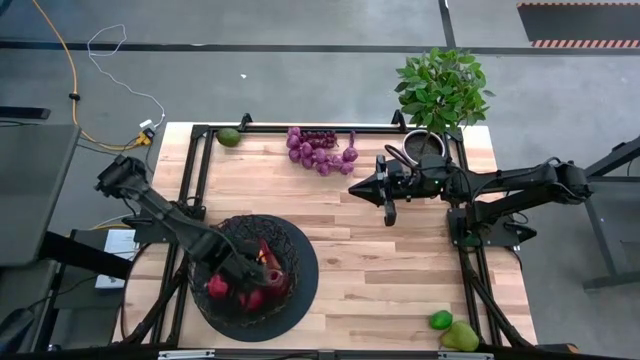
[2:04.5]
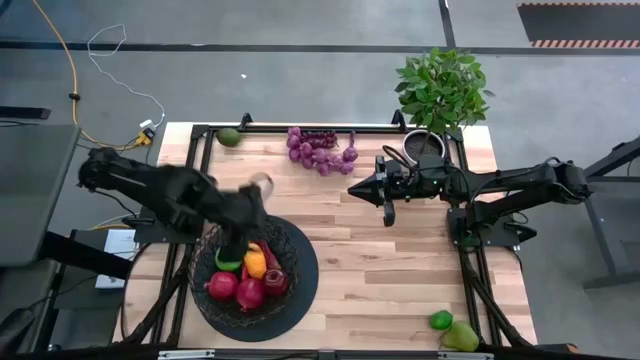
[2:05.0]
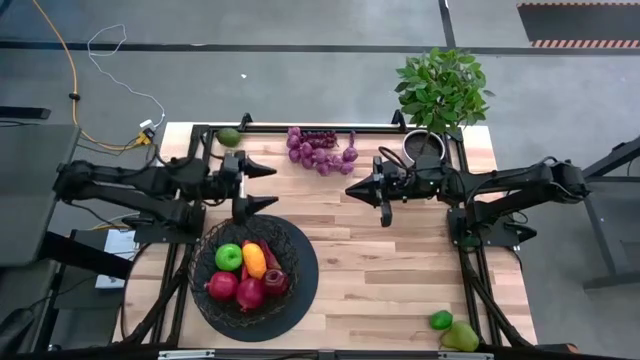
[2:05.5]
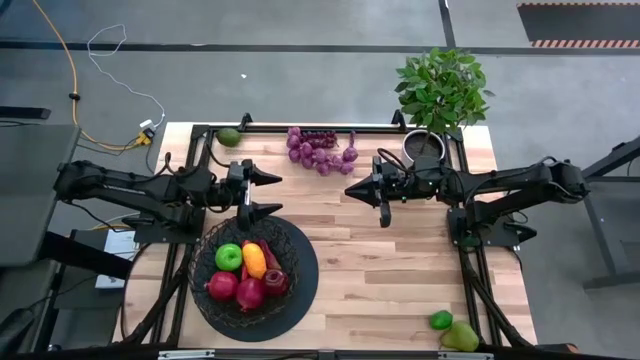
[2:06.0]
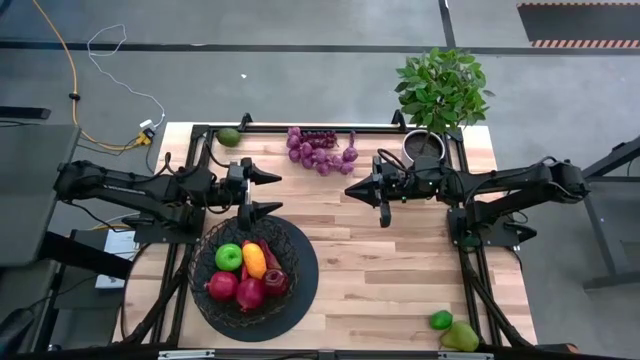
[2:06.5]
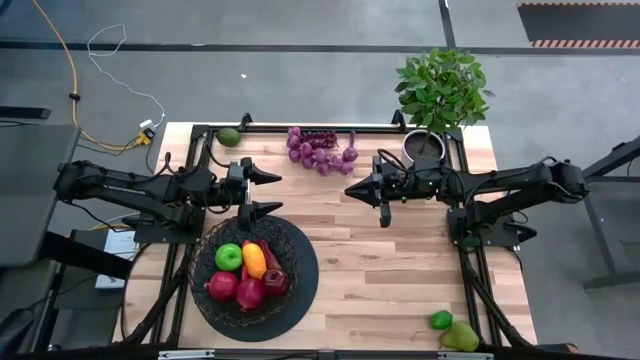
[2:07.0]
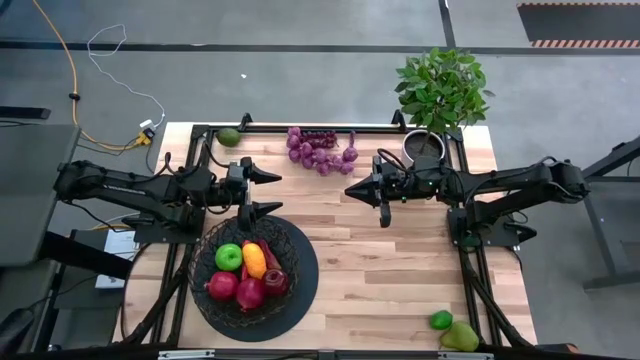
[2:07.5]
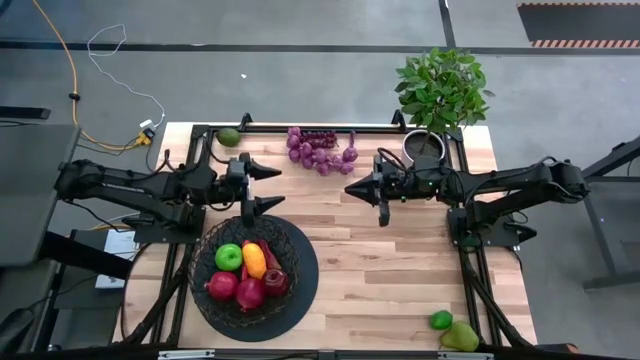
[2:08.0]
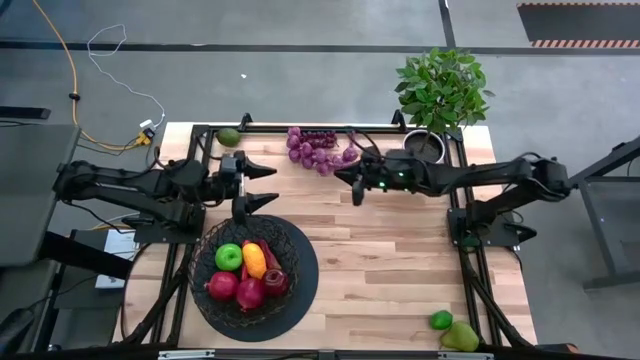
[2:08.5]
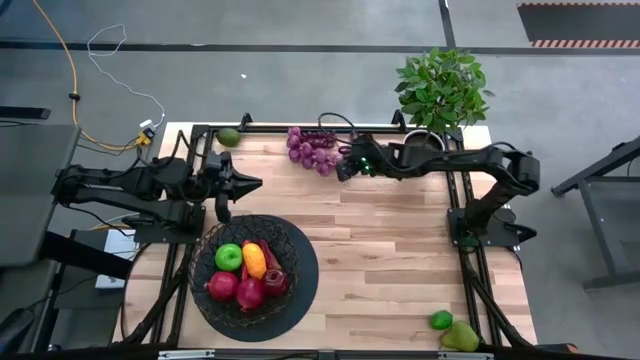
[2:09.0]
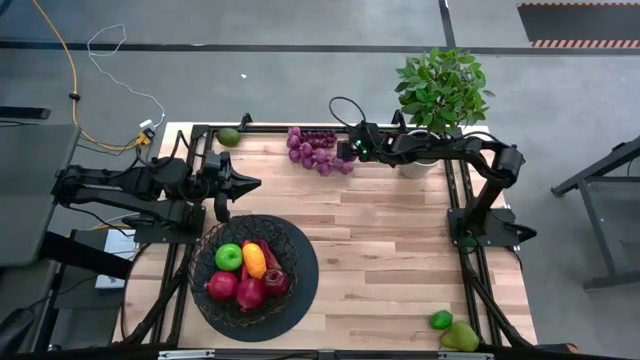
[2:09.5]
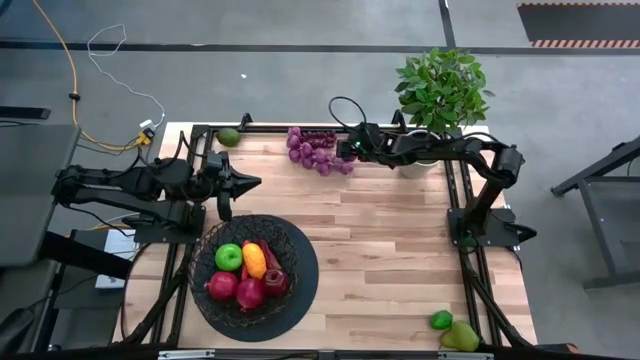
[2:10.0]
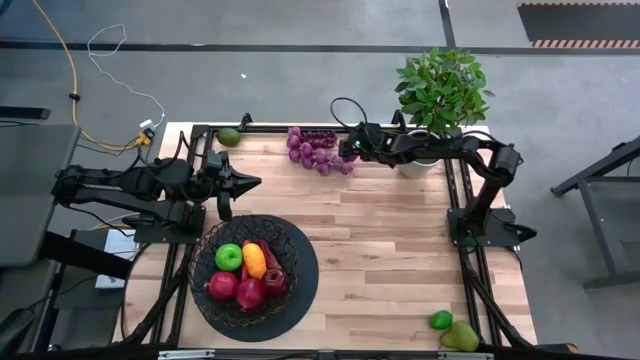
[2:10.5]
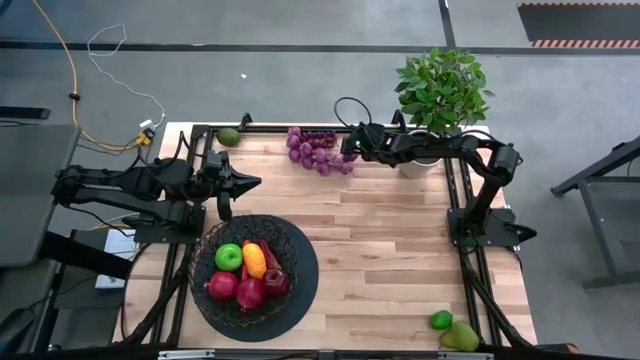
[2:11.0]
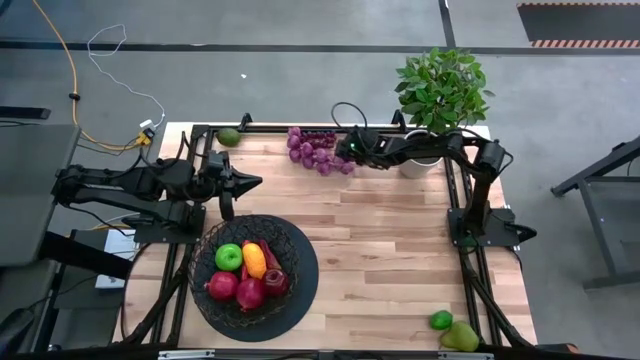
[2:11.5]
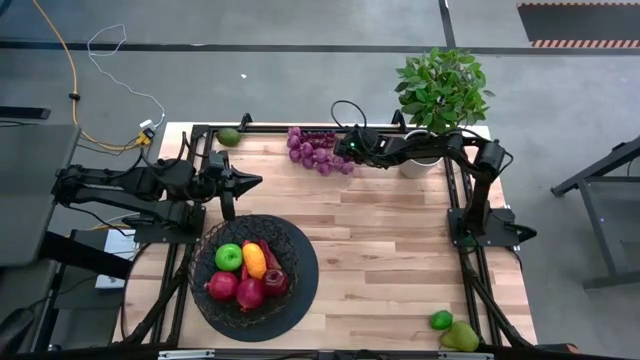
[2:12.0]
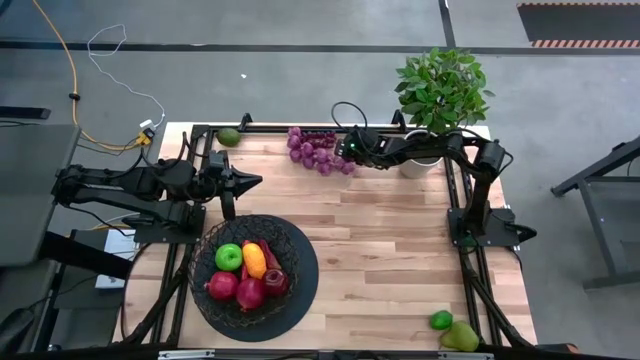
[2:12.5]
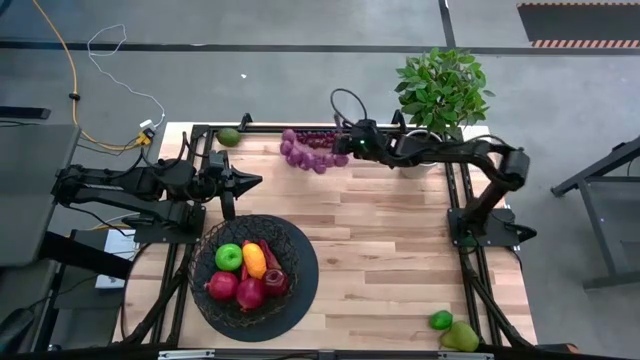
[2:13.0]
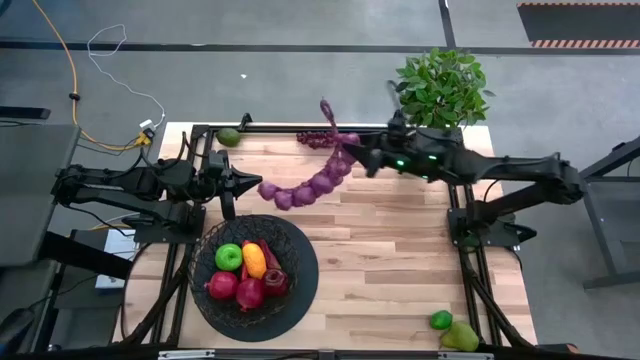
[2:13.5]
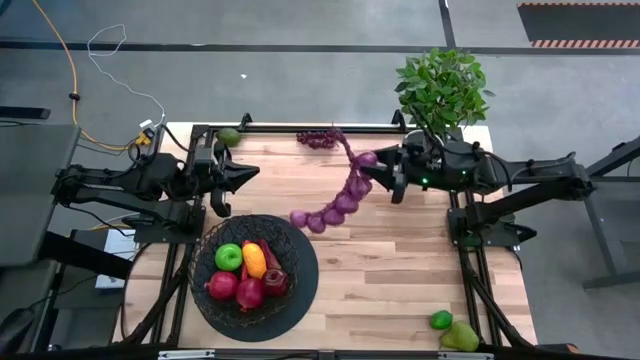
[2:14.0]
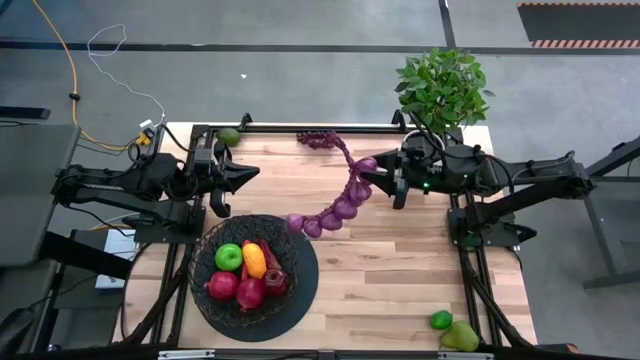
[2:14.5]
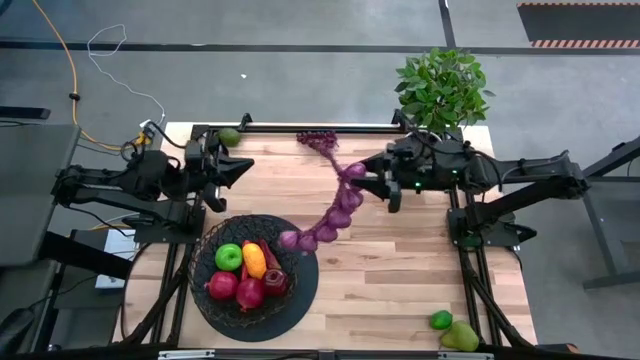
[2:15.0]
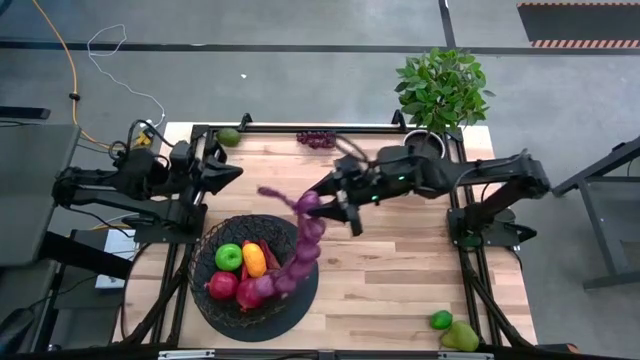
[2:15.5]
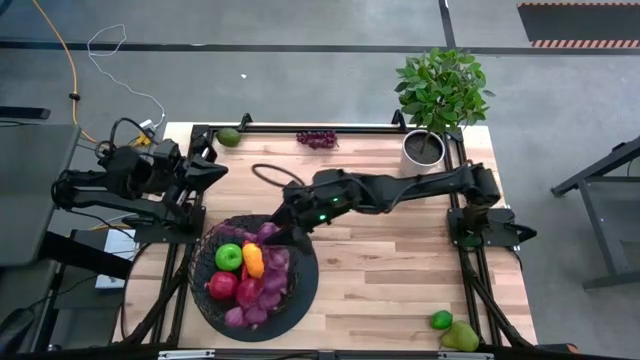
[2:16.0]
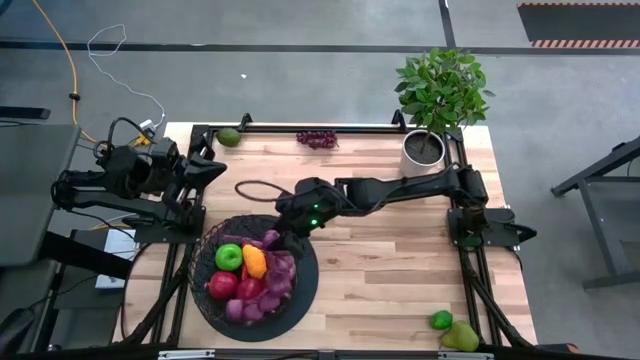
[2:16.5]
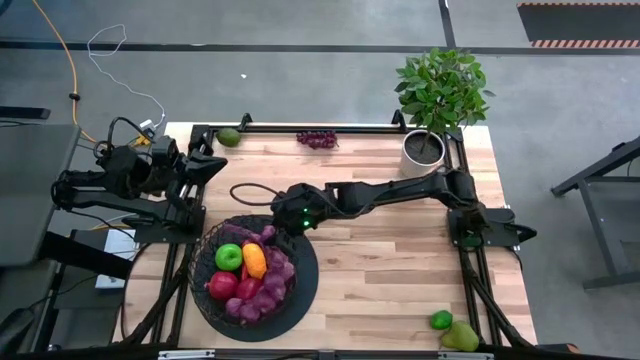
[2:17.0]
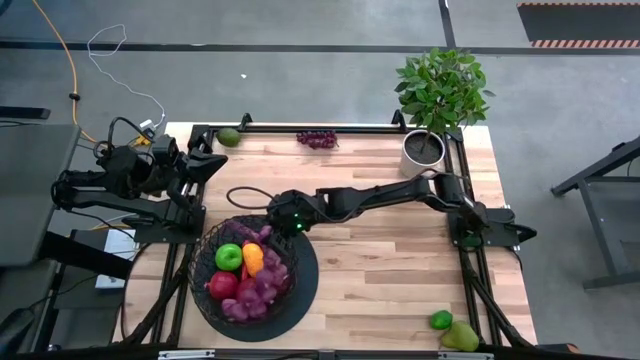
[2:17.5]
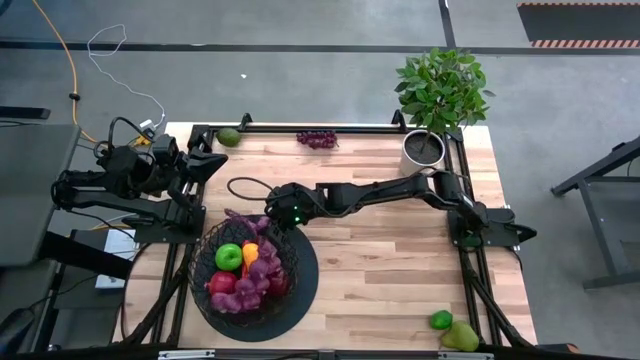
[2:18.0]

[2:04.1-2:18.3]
Task: Build produce basket
Put the purple garlic into the black basket

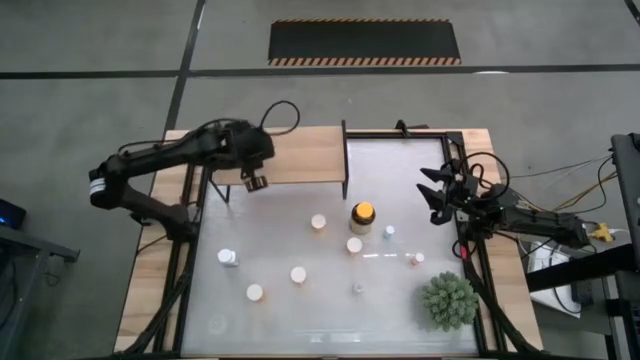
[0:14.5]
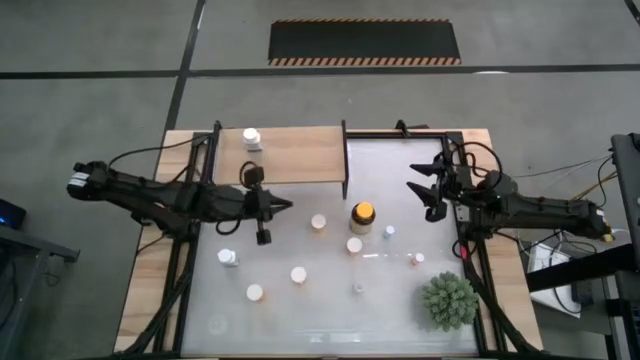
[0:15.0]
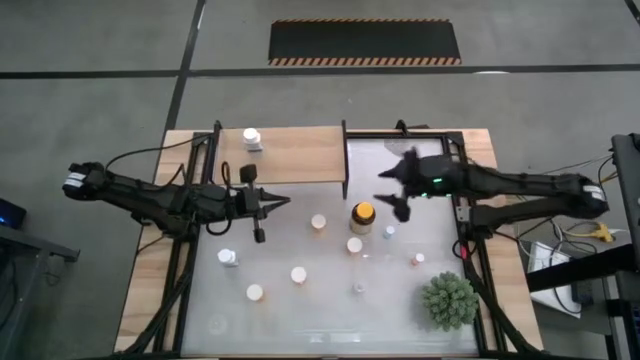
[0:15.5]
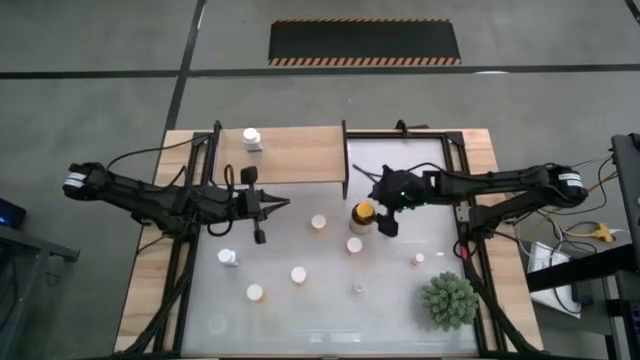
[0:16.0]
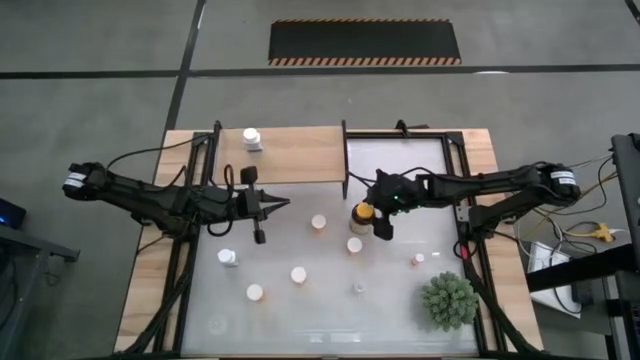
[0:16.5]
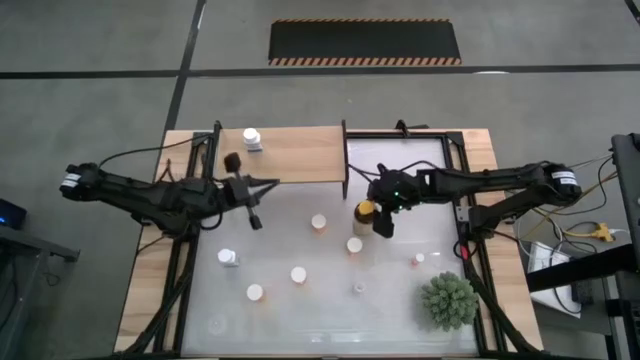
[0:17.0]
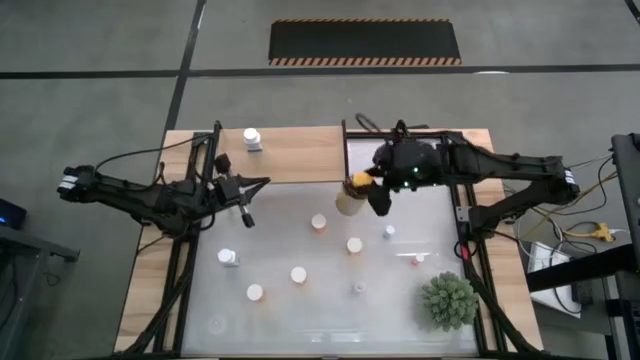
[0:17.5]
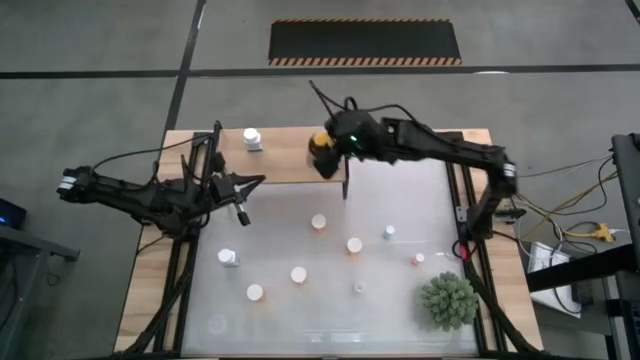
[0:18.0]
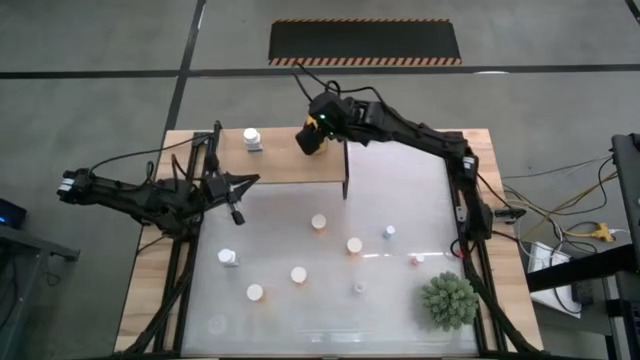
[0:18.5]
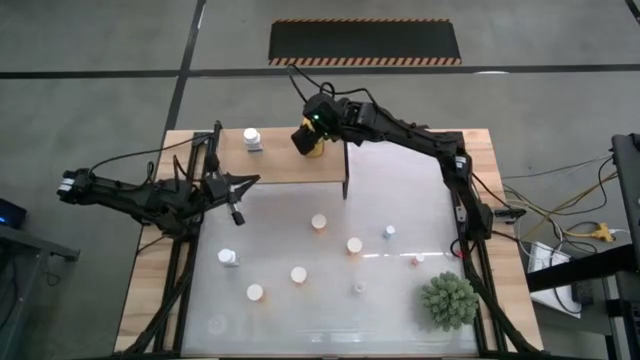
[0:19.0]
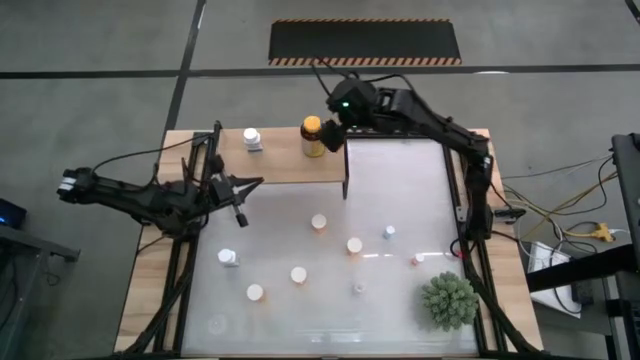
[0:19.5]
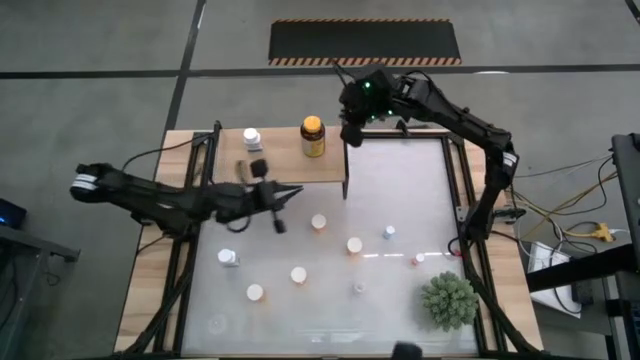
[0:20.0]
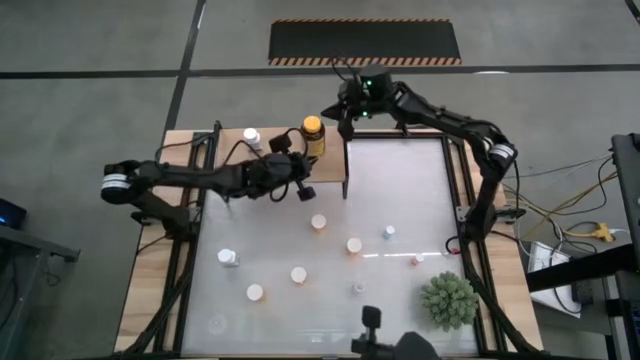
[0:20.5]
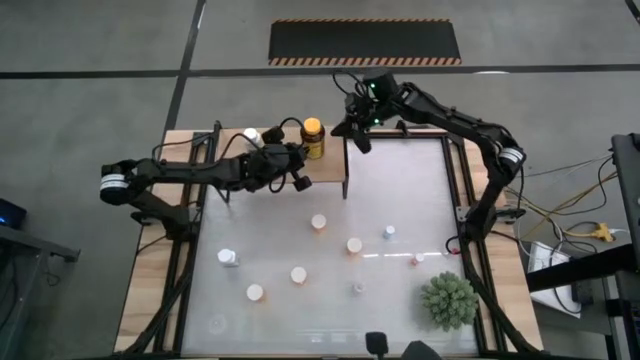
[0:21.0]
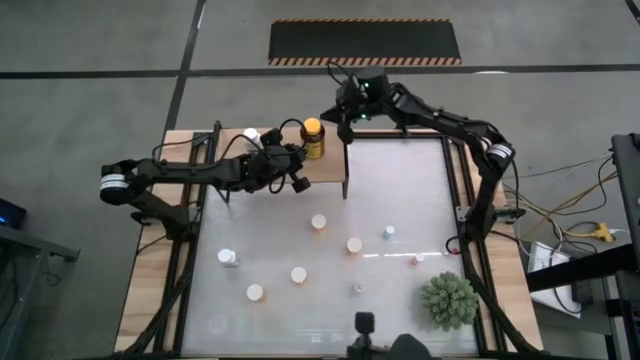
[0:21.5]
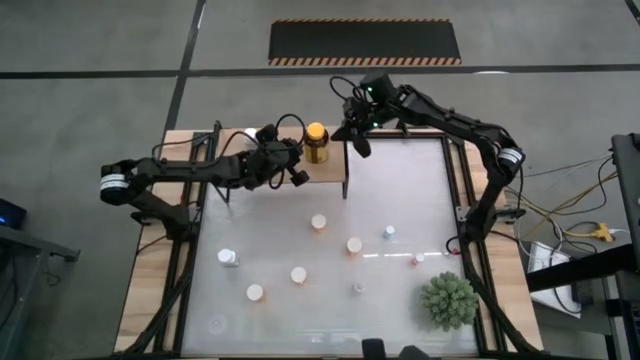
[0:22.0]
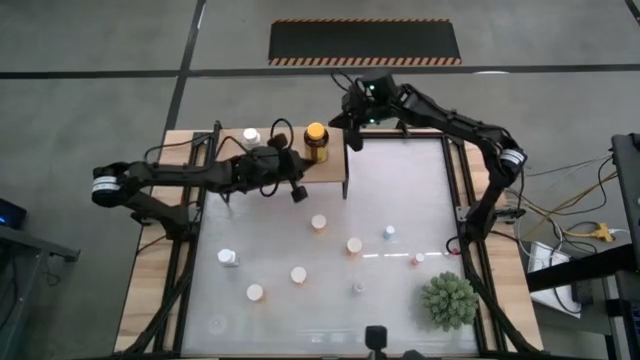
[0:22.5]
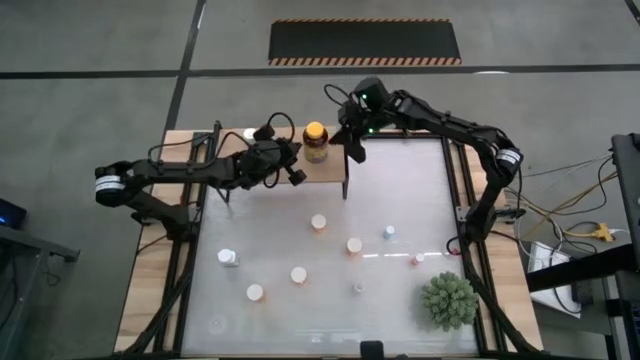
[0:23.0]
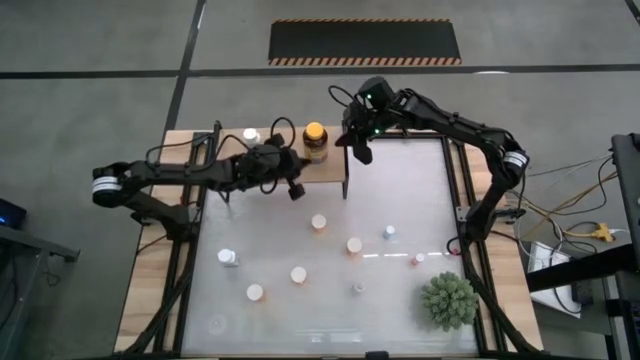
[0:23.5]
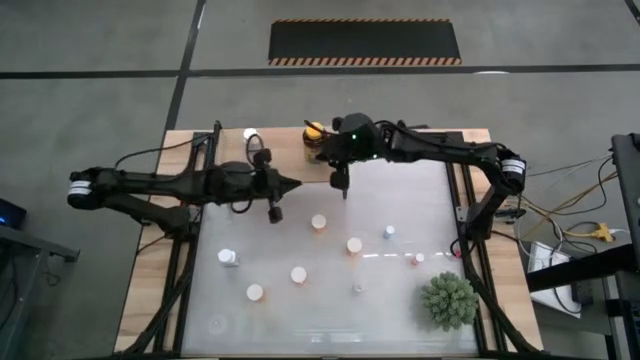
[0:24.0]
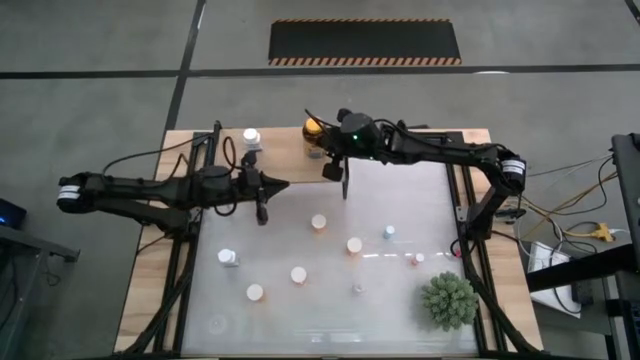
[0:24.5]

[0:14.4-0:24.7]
Task: Pick and place medicine bottles onto shelf by color
Put the yellow medicine bottle on the shelf
